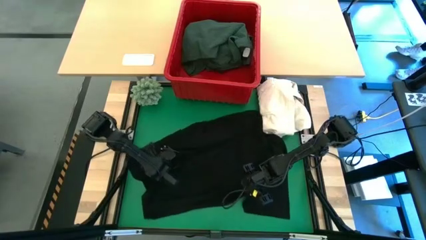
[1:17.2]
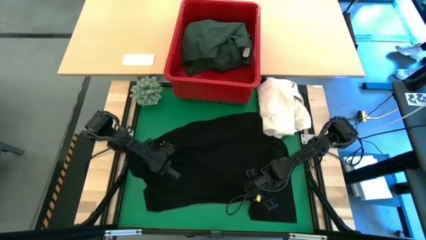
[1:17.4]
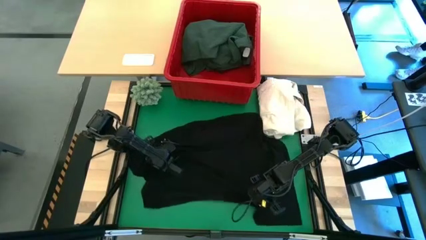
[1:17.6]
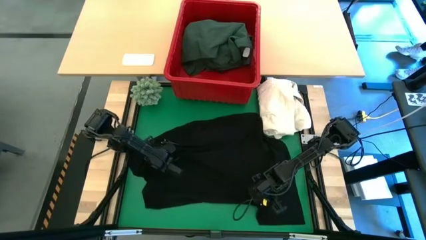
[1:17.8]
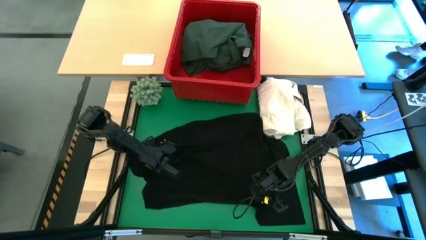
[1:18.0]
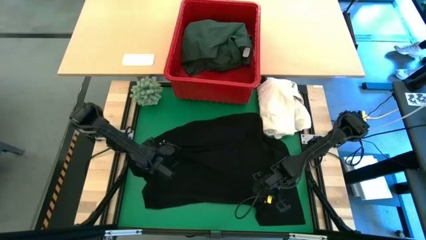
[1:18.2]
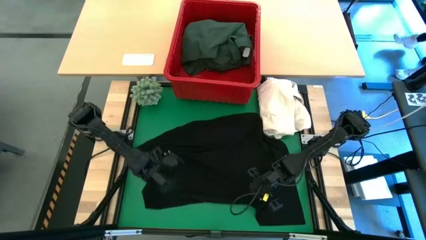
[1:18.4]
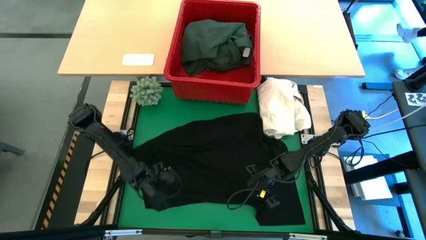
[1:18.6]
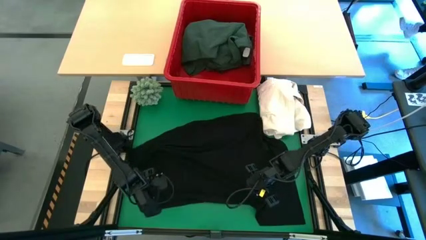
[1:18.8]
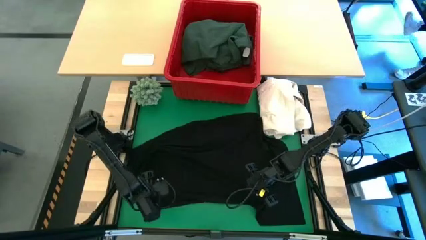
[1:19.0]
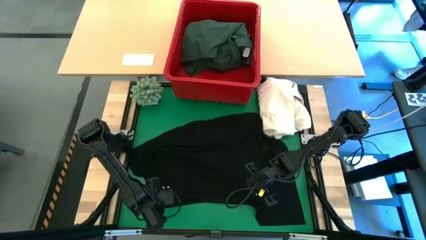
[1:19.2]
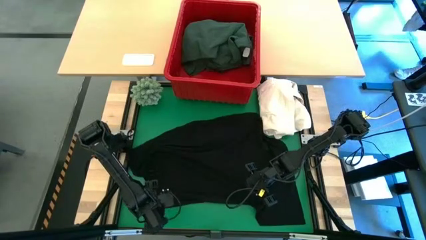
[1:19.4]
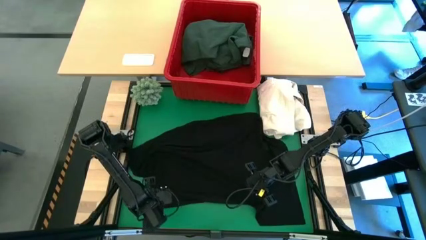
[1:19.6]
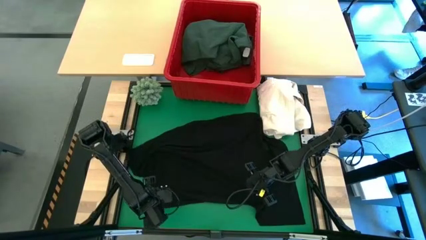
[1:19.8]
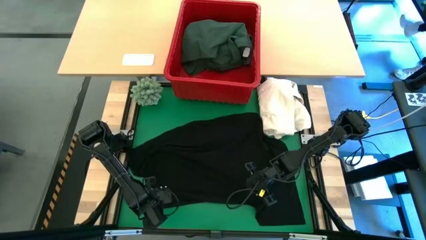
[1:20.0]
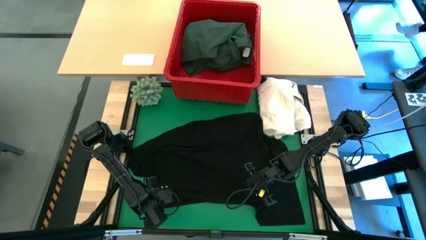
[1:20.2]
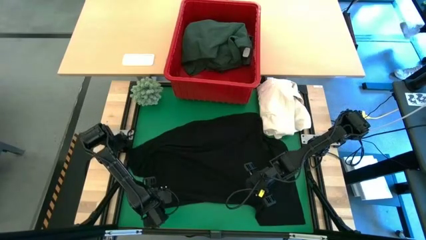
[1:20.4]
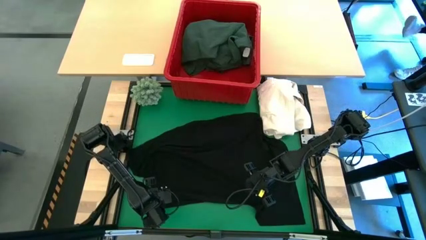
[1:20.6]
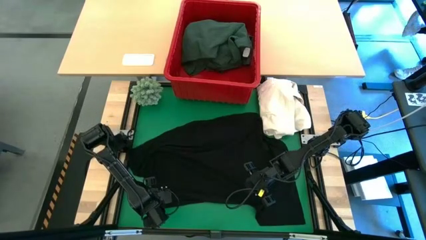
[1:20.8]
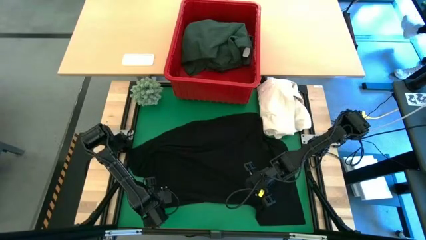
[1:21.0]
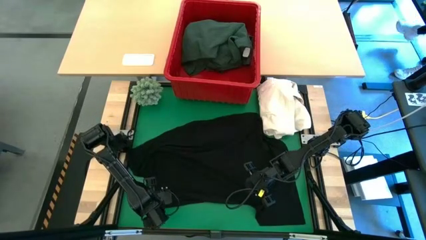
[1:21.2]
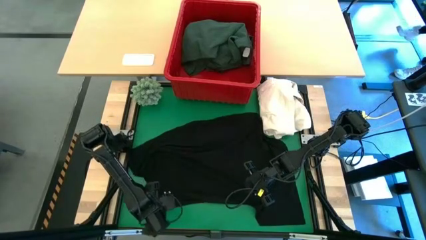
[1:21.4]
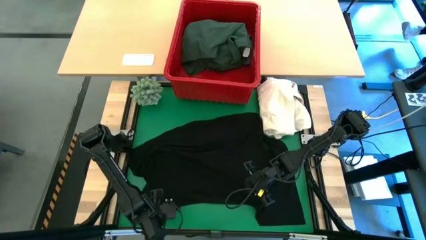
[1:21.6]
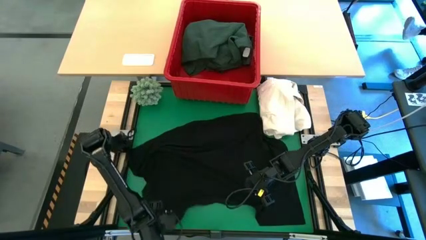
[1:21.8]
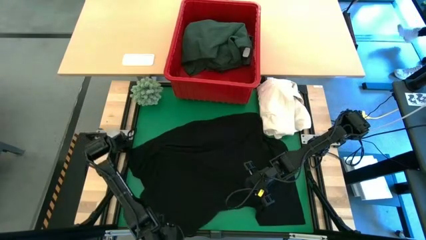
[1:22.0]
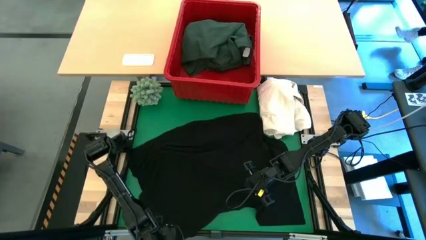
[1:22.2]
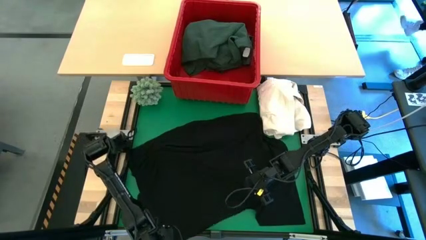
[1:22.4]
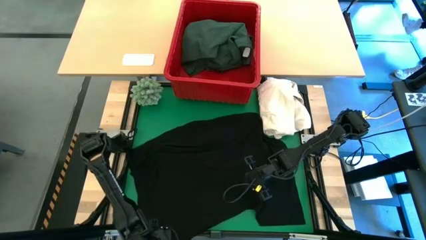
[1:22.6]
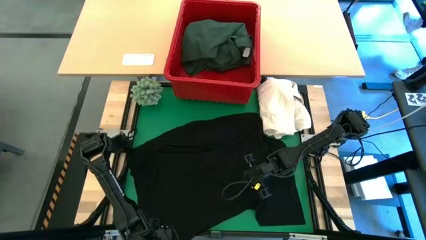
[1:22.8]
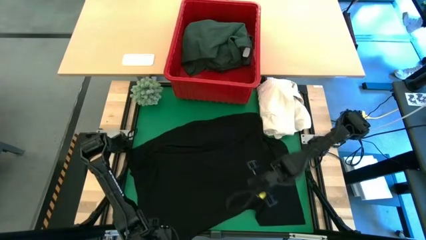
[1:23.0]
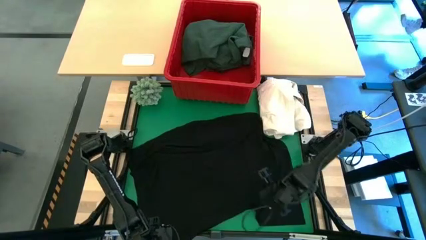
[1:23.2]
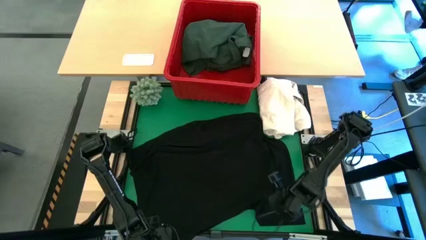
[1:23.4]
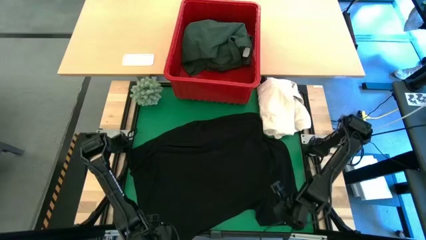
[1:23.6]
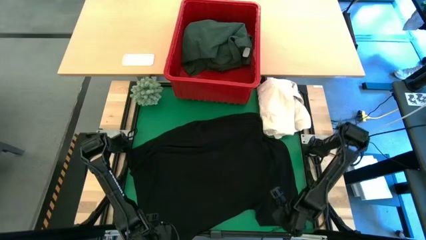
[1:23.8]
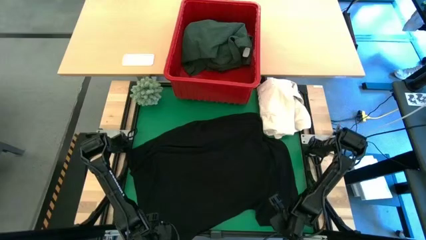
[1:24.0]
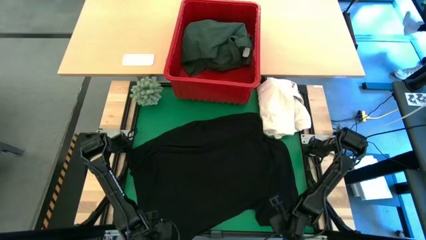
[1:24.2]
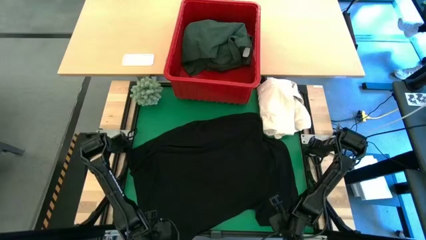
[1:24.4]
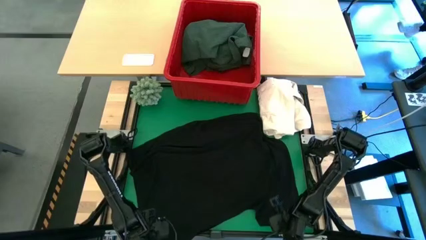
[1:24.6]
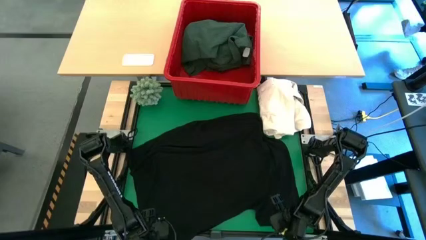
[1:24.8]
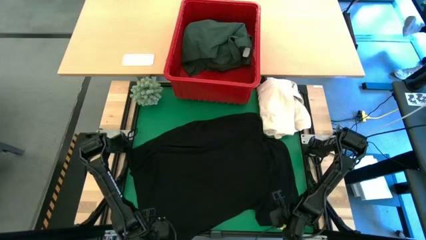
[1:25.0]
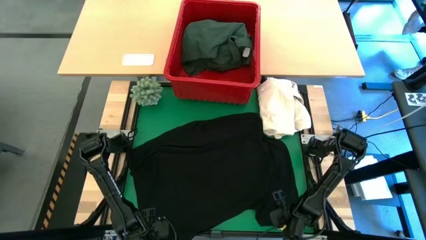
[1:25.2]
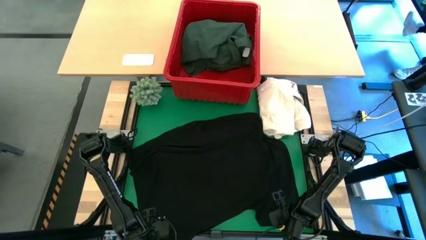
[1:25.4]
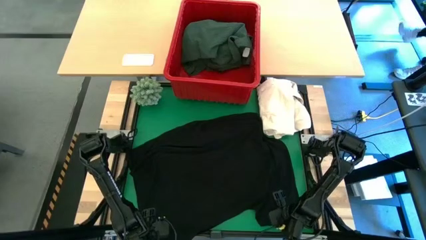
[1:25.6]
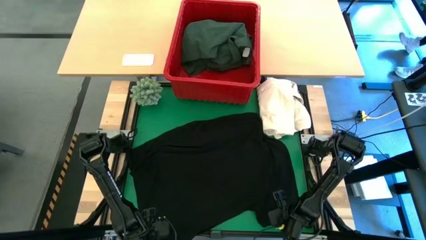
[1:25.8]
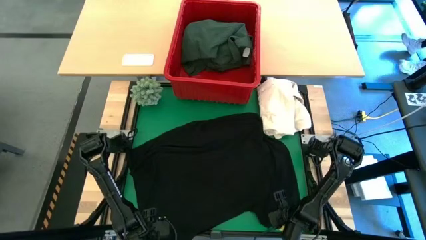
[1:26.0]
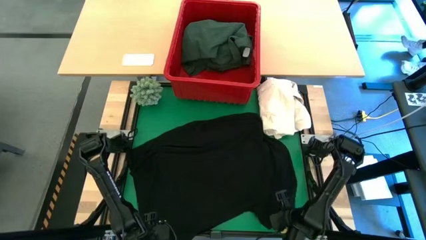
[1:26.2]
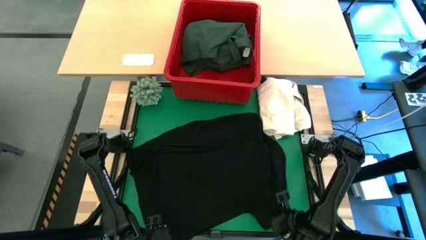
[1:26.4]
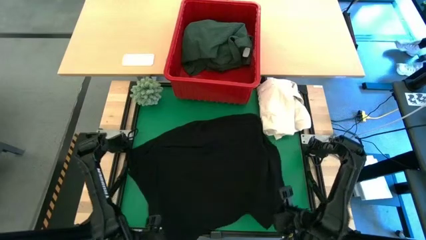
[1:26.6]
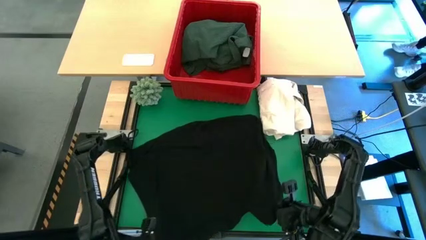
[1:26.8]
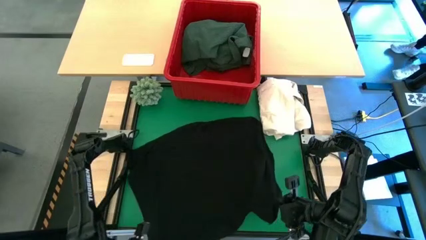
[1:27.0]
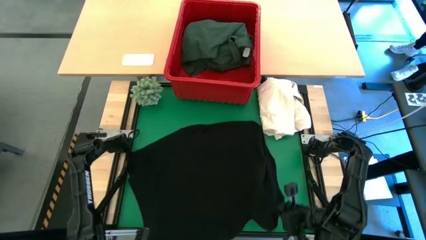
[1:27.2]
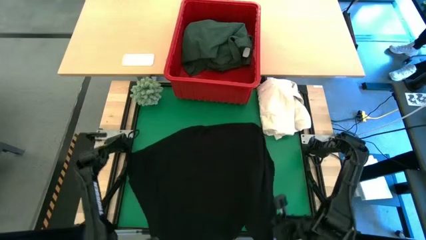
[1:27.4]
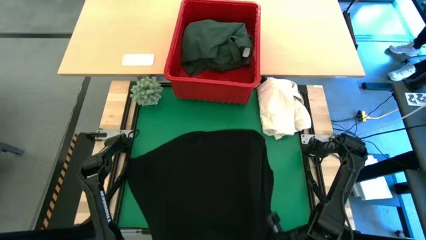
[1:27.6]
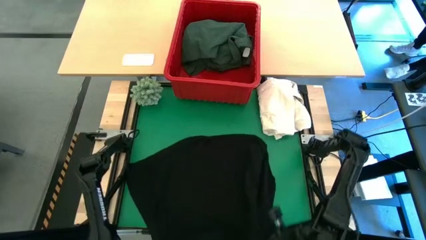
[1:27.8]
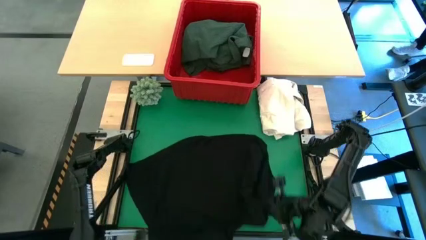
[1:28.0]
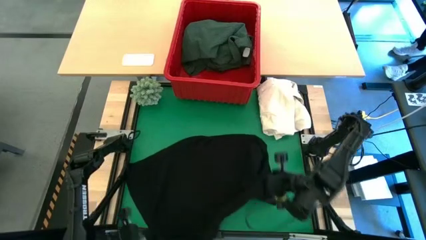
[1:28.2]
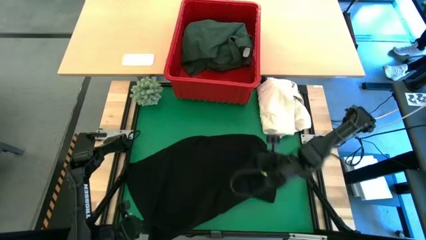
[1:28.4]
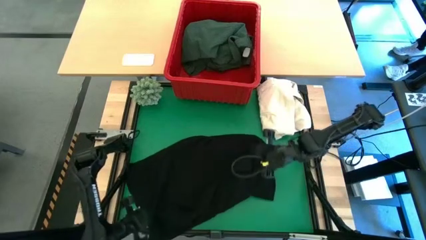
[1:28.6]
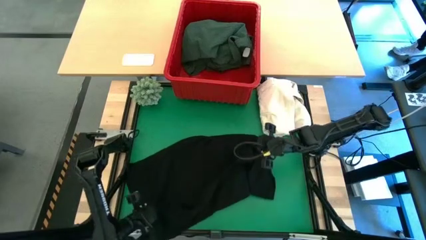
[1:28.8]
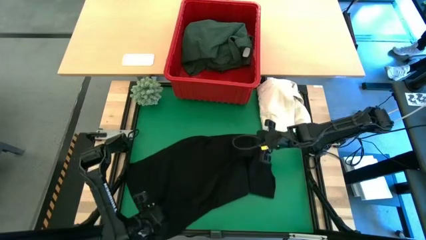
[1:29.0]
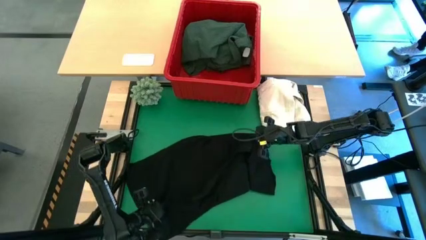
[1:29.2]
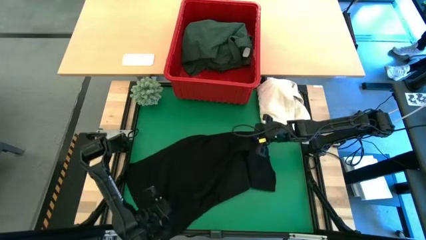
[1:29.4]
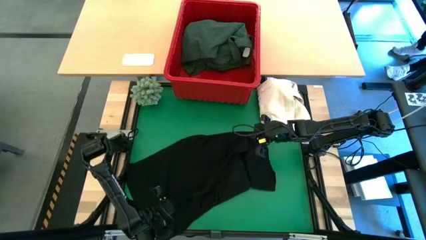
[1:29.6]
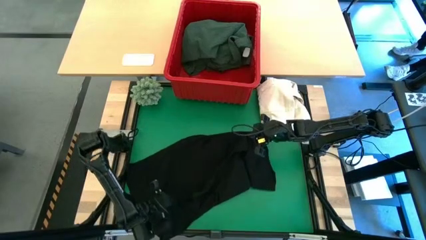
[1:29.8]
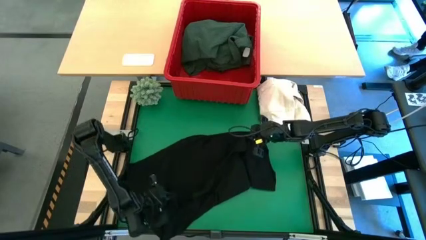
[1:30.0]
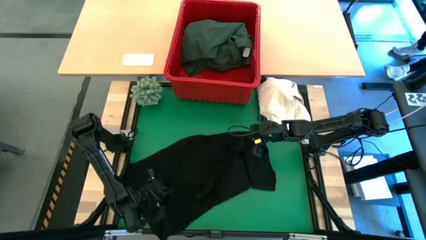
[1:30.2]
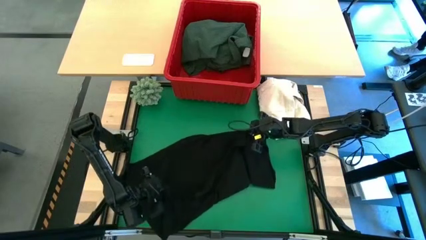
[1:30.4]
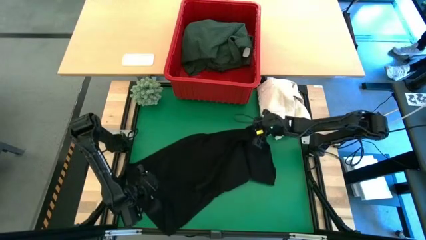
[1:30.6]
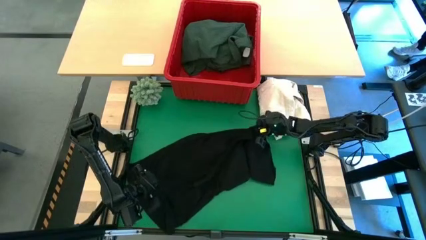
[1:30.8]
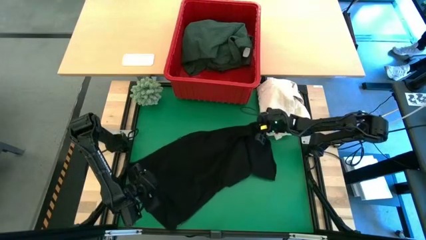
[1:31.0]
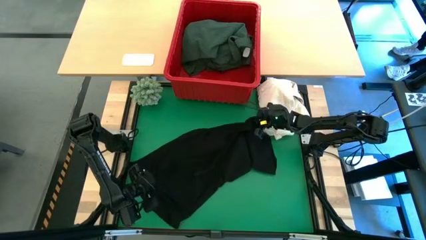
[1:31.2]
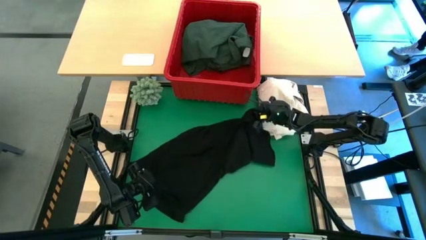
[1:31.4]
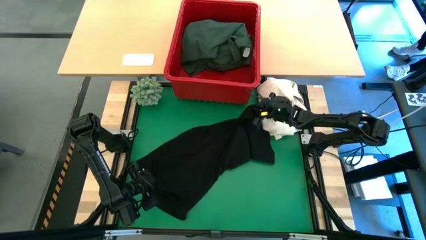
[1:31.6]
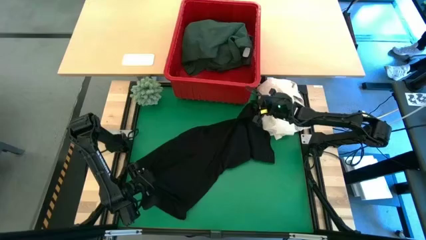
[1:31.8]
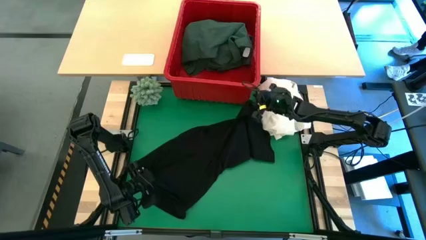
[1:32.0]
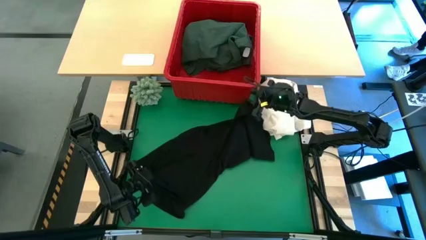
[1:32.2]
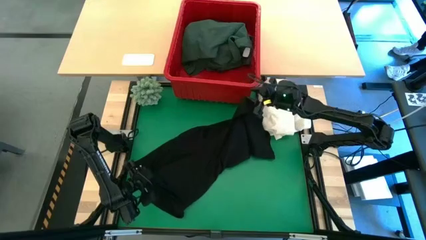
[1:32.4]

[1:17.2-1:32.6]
Task: Fold laundry
Fold the black shirt

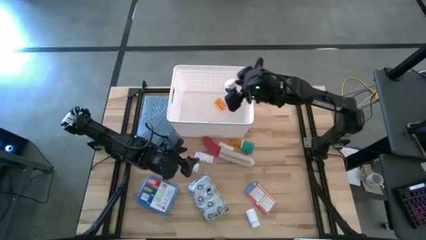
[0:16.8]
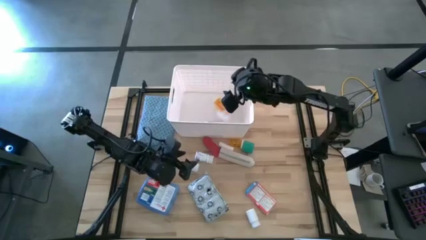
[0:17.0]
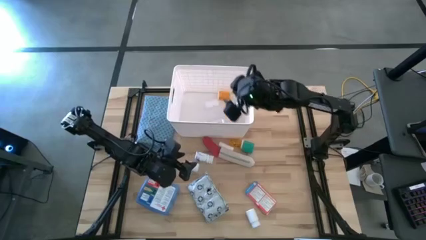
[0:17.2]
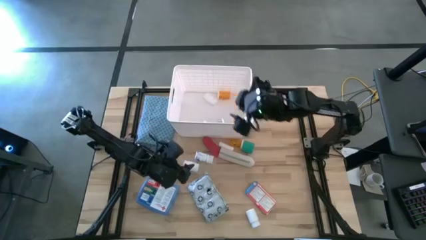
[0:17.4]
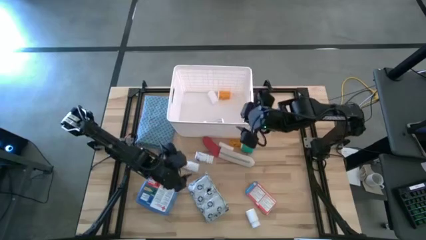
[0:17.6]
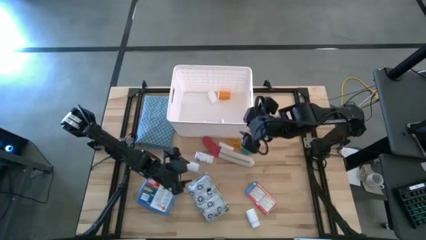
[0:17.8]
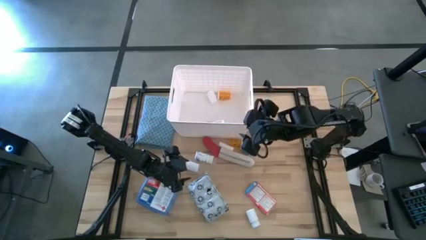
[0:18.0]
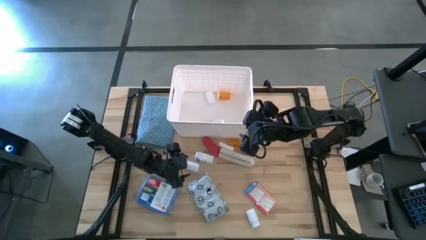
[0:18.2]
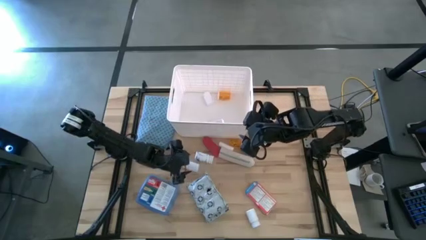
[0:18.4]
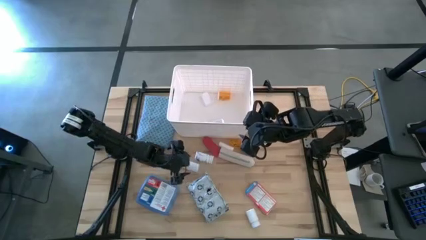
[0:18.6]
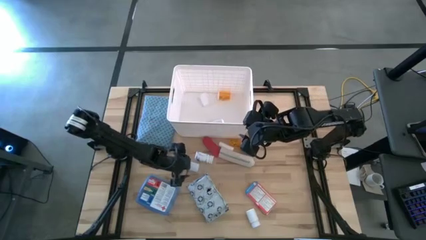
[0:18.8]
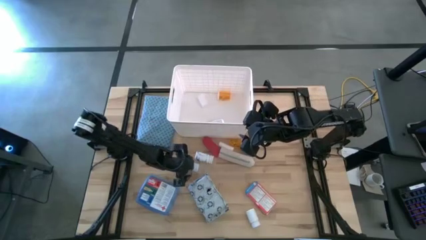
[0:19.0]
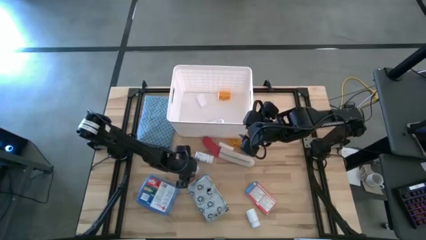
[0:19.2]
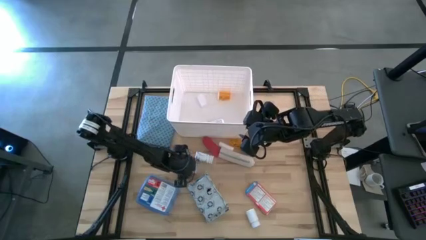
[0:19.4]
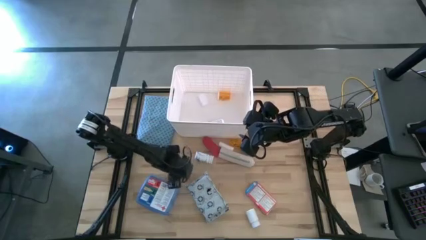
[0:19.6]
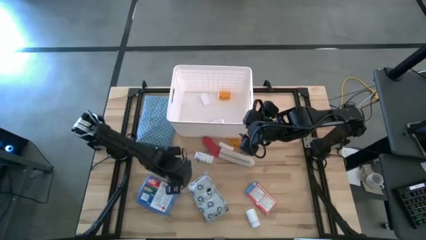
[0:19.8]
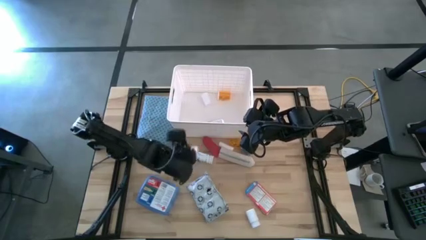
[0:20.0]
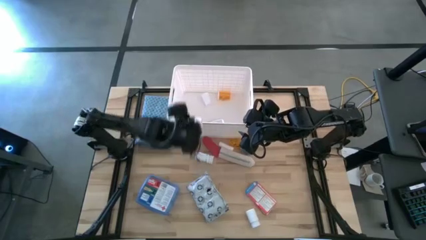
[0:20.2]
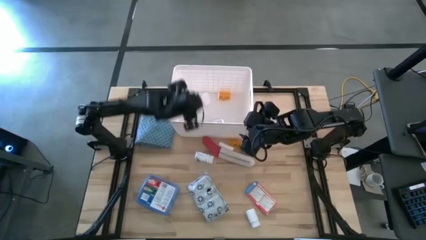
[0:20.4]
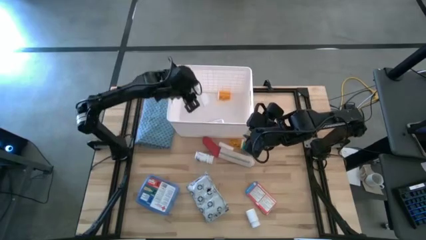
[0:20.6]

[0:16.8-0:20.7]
Task: Pick & place medical supplies in basket/bin
Put the top white medicine bottle in the white bin
